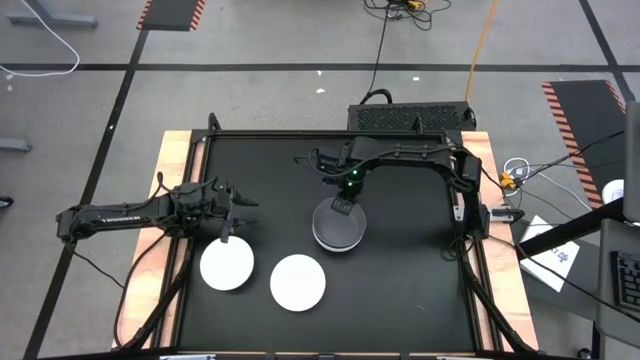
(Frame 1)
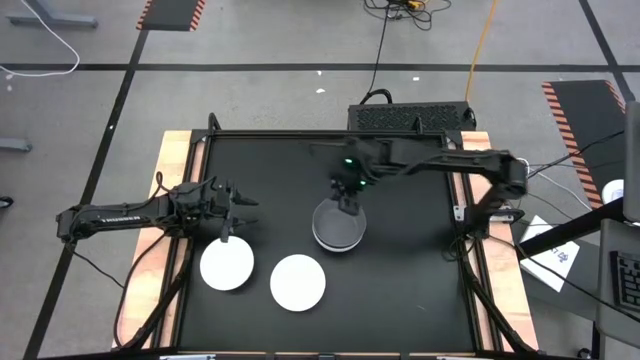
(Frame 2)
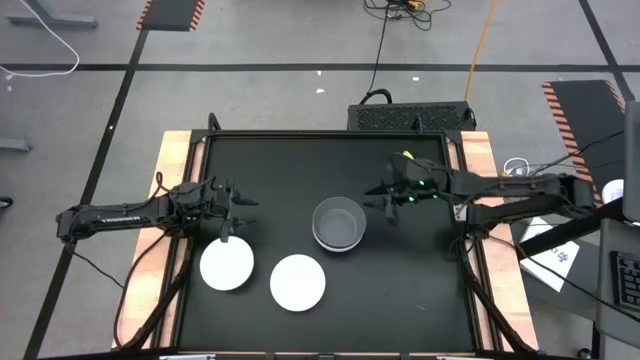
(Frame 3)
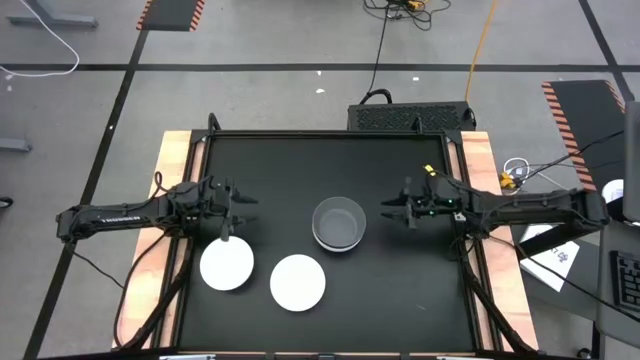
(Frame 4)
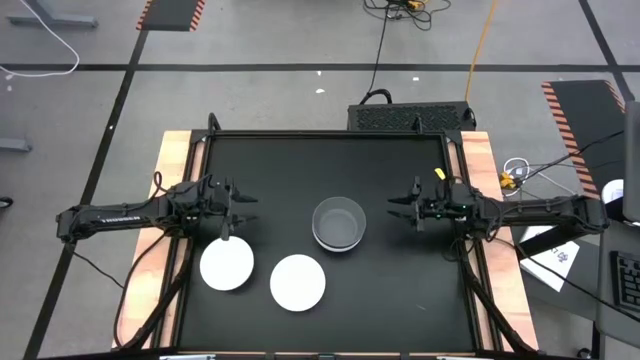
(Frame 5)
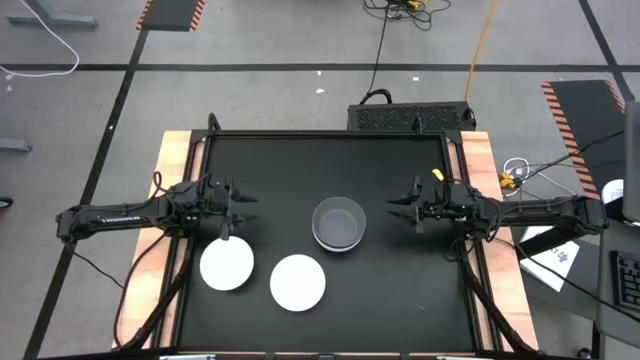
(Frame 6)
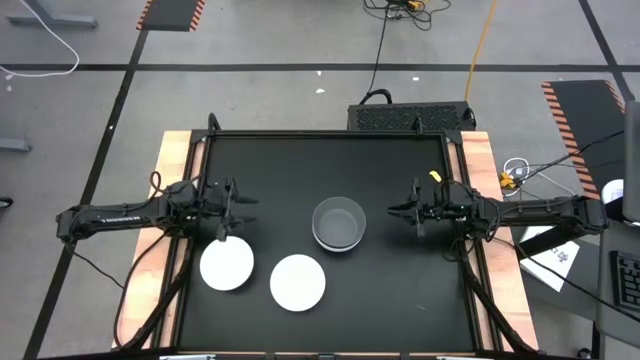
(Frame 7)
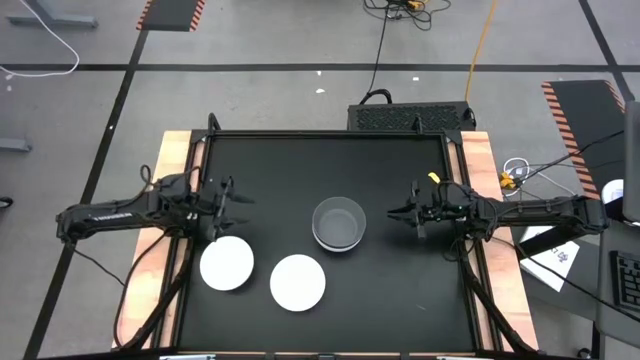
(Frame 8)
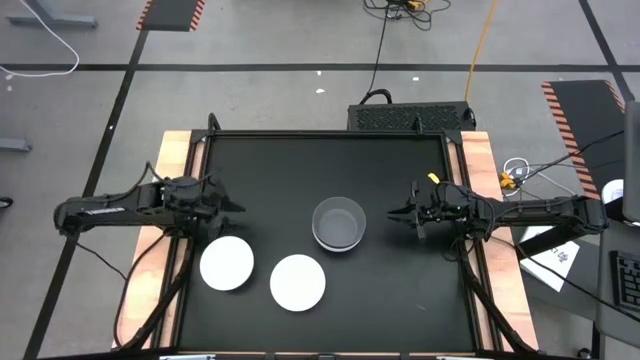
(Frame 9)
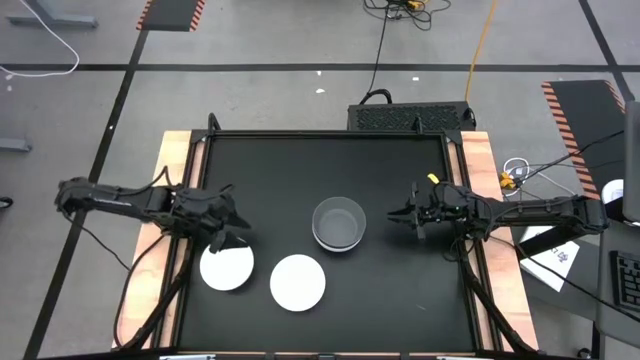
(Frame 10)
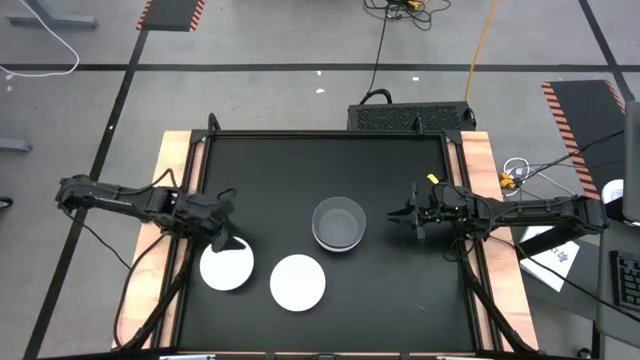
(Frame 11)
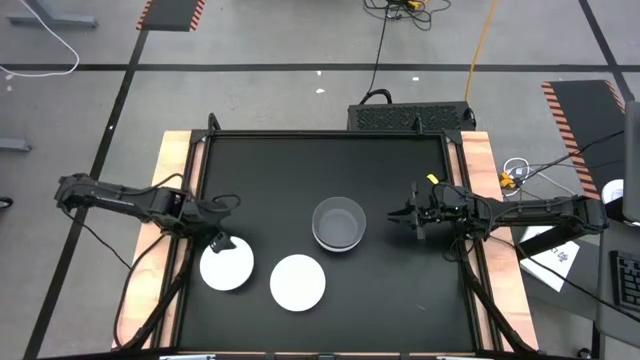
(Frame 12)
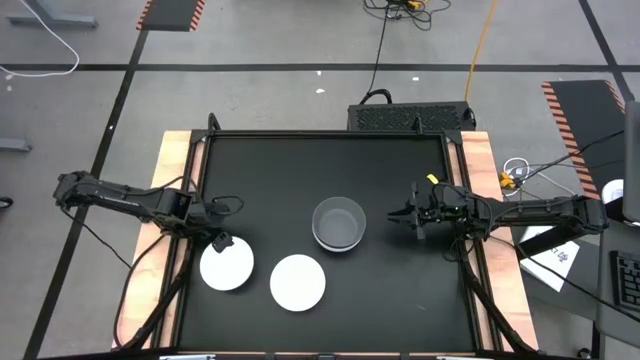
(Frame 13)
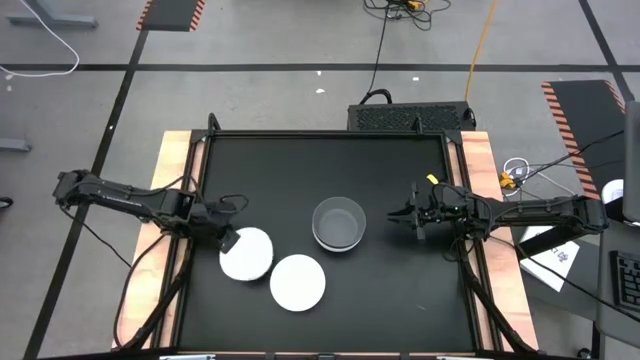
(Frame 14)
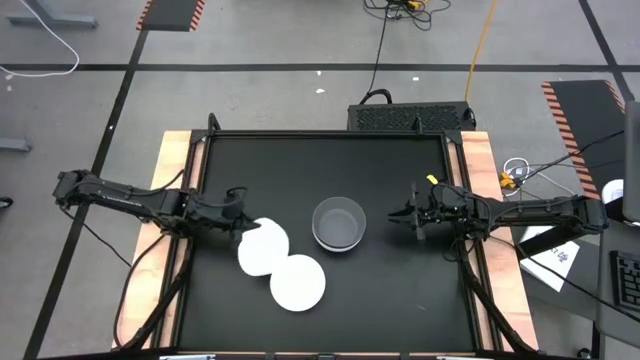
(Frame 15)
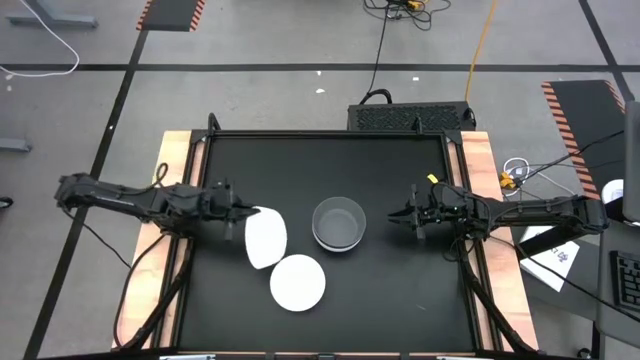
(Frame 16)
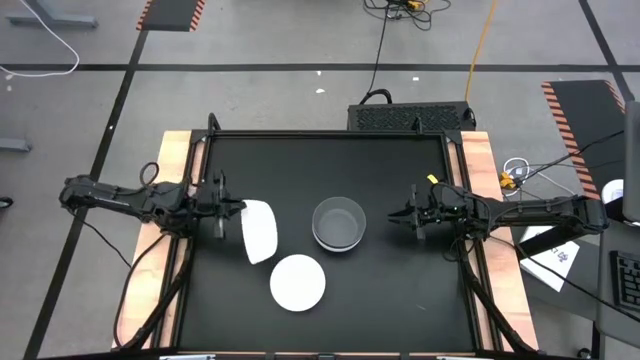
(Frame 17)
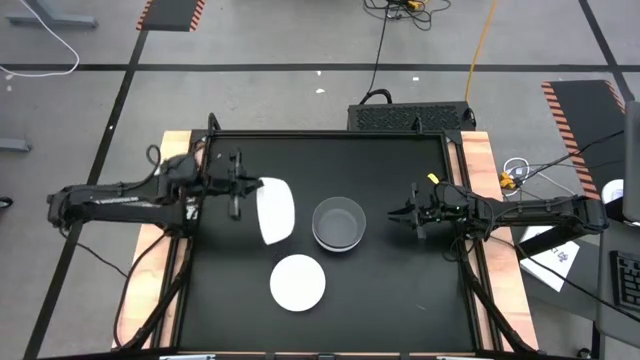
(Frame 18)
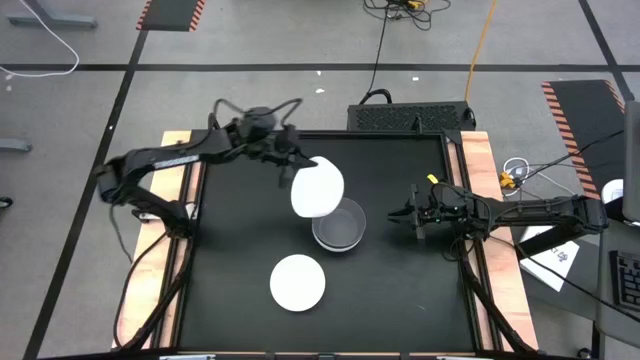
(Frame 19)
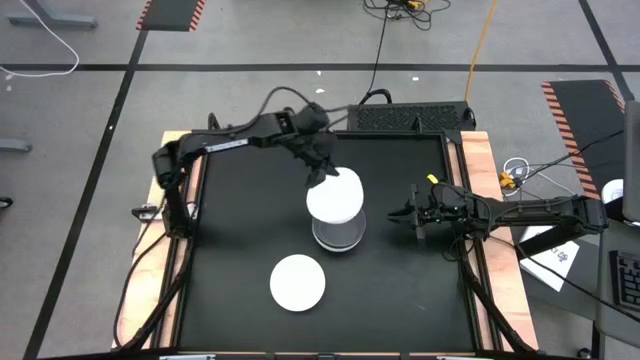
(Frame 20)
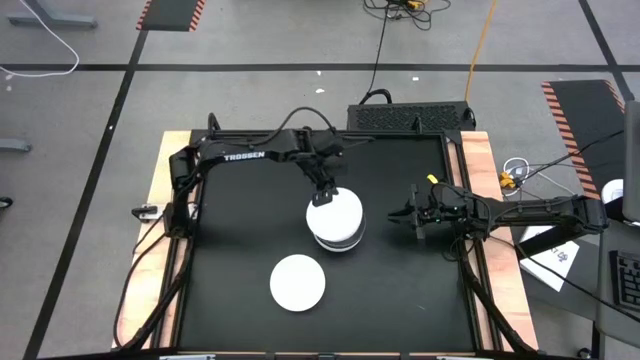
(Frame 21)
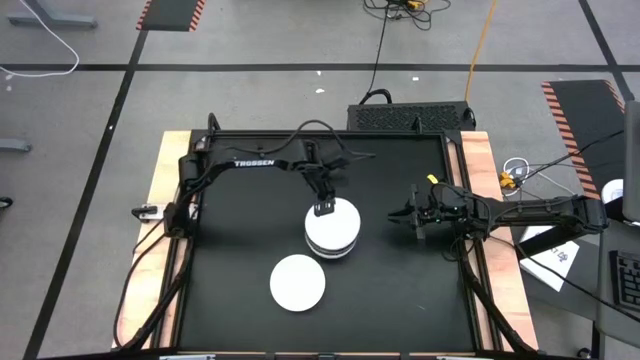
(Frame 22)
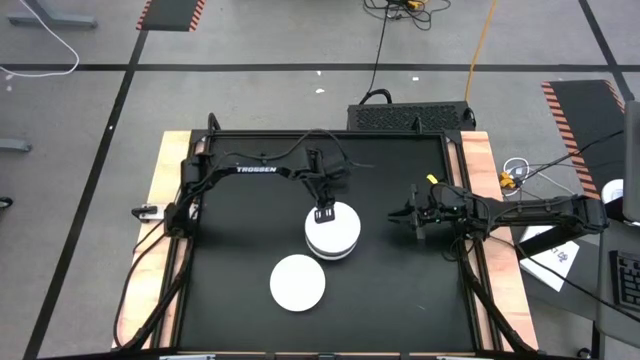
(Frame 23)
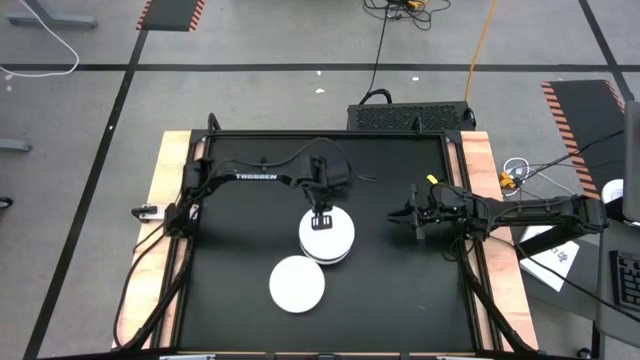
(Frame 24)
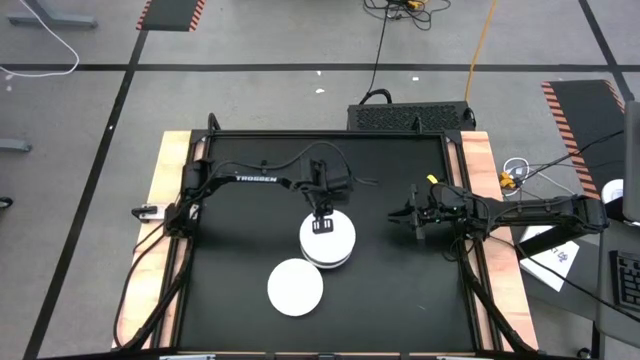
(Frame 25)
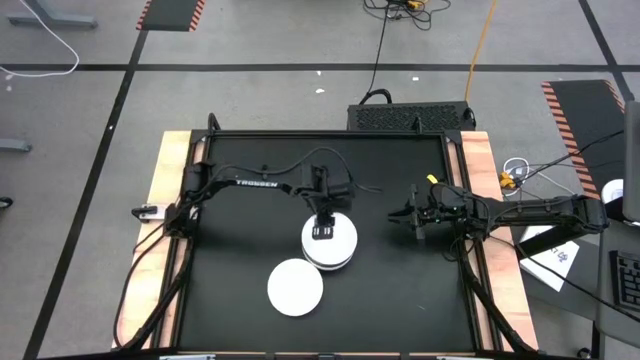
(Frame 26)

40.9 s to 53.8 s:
Task: Nest bowls inside each other
Stack the left white bowl on the dark gray bowl

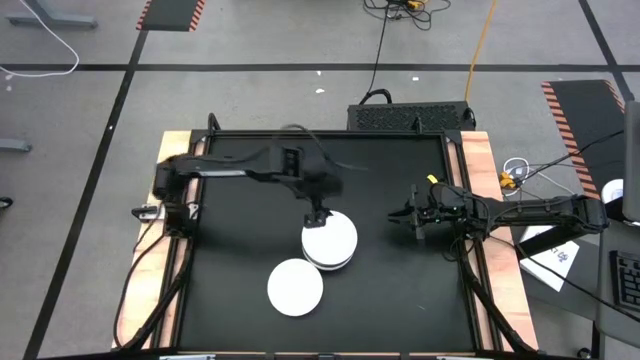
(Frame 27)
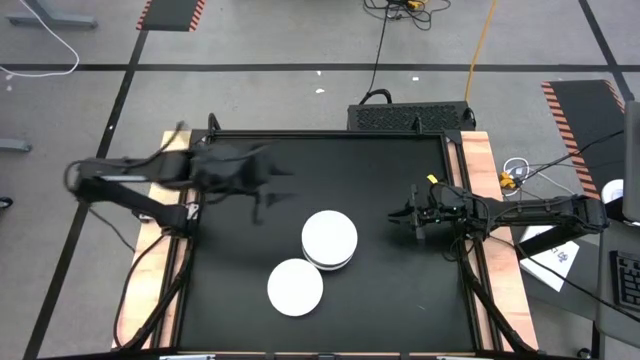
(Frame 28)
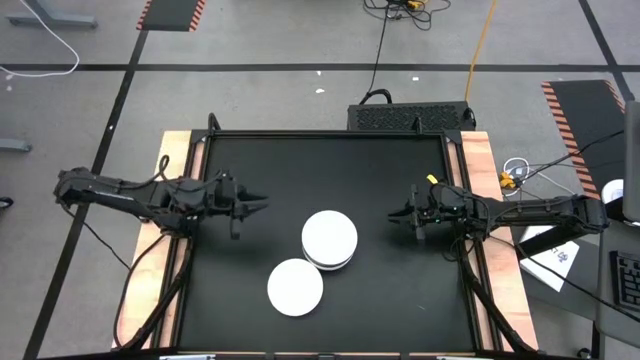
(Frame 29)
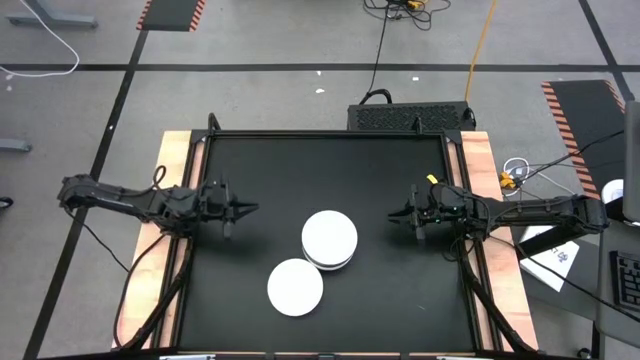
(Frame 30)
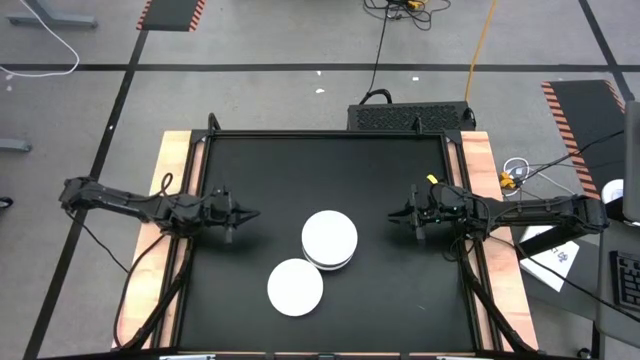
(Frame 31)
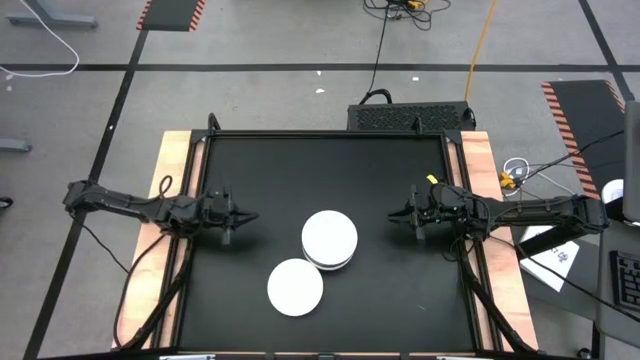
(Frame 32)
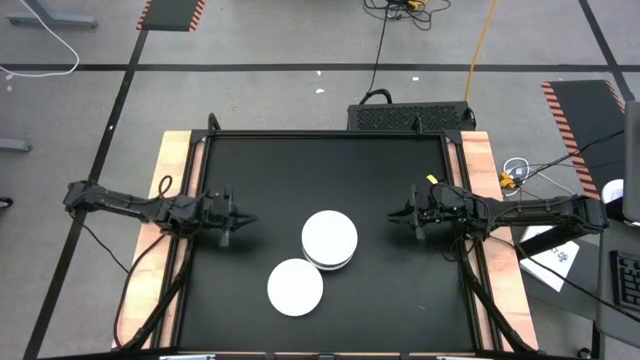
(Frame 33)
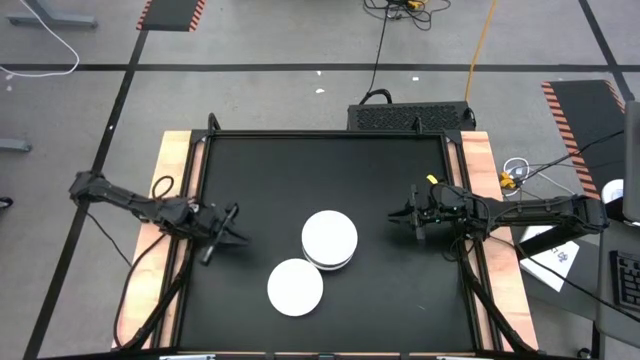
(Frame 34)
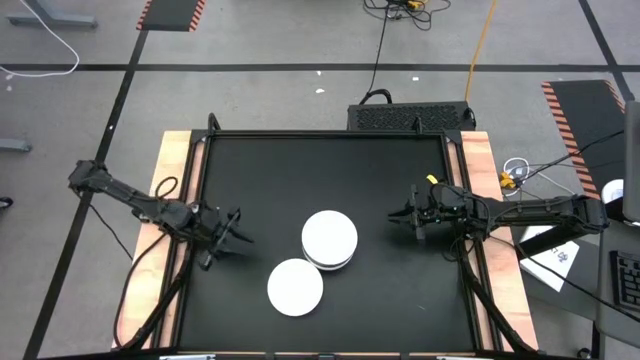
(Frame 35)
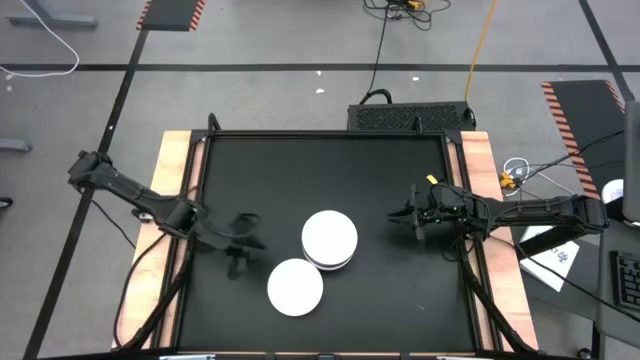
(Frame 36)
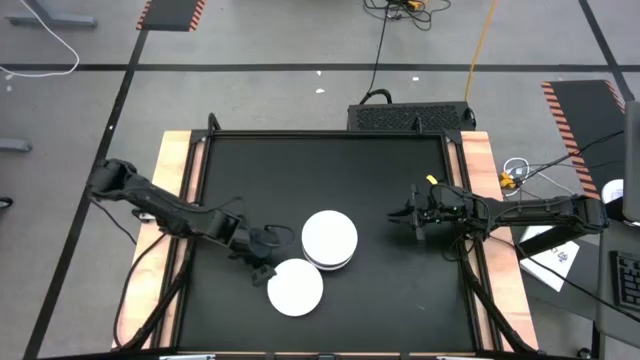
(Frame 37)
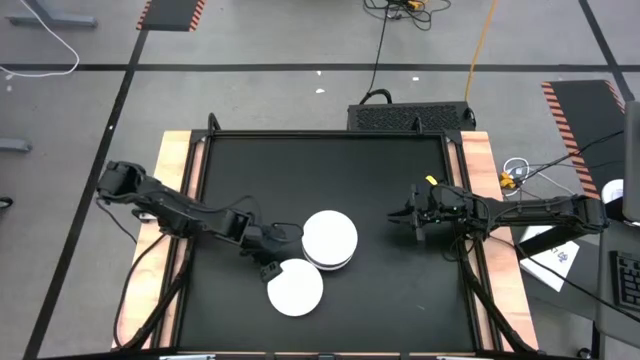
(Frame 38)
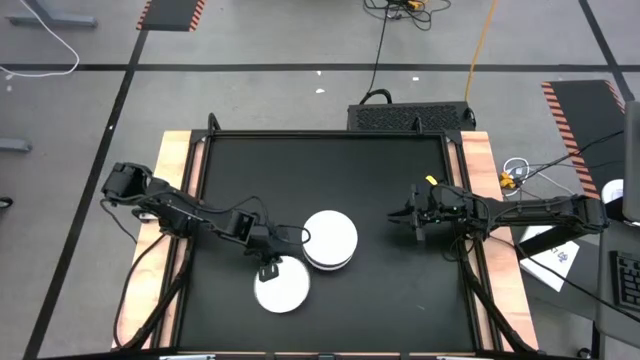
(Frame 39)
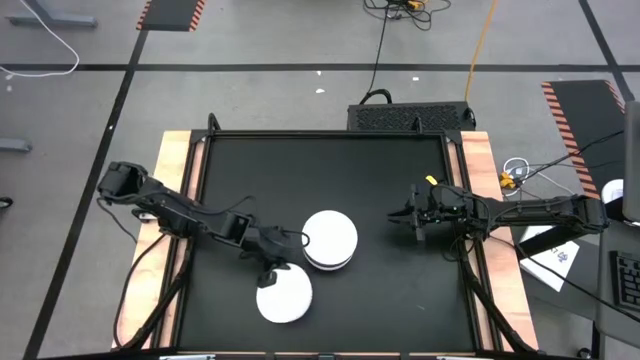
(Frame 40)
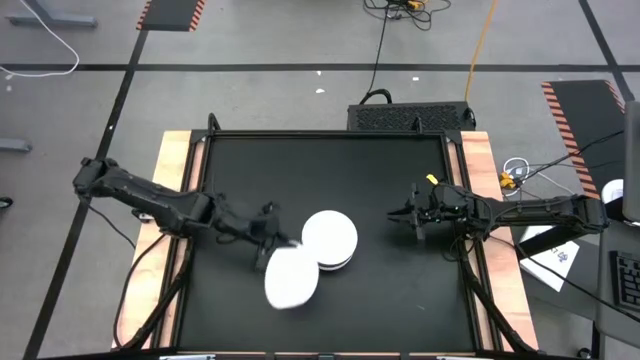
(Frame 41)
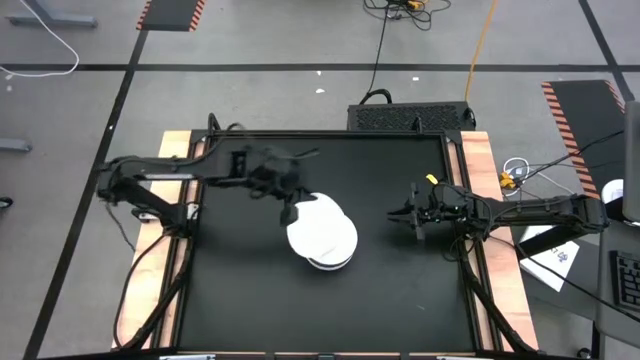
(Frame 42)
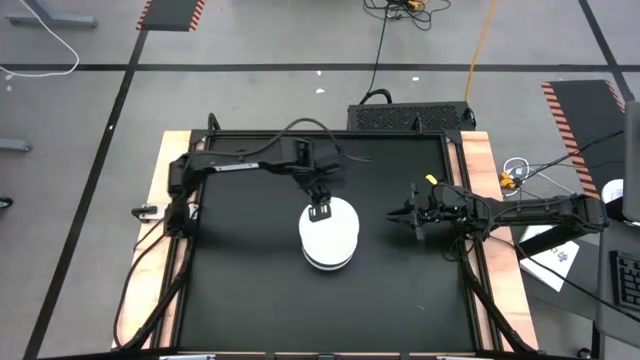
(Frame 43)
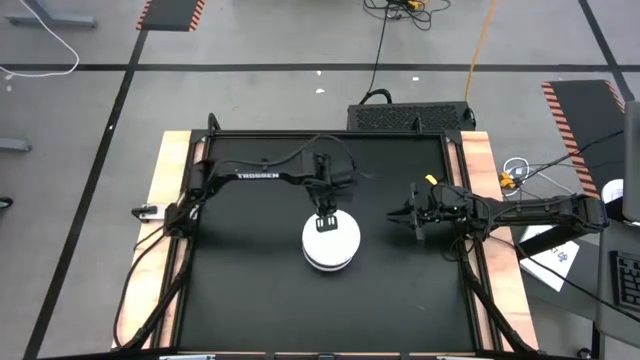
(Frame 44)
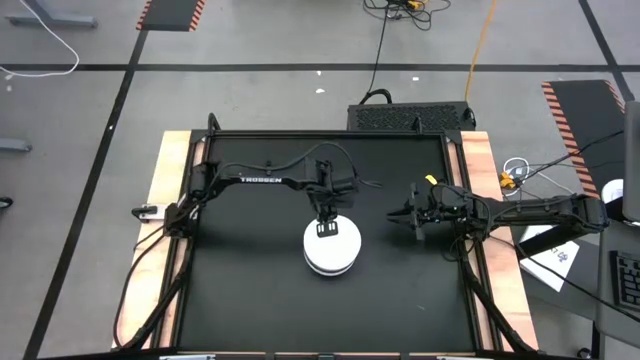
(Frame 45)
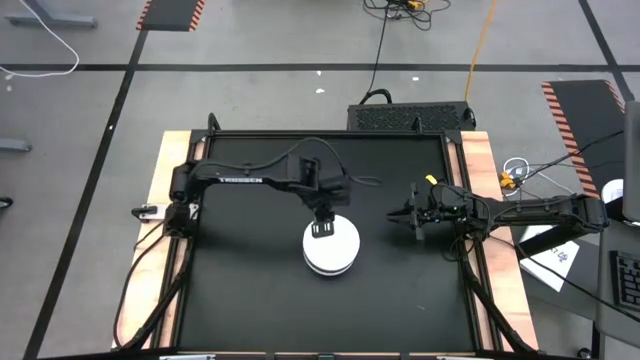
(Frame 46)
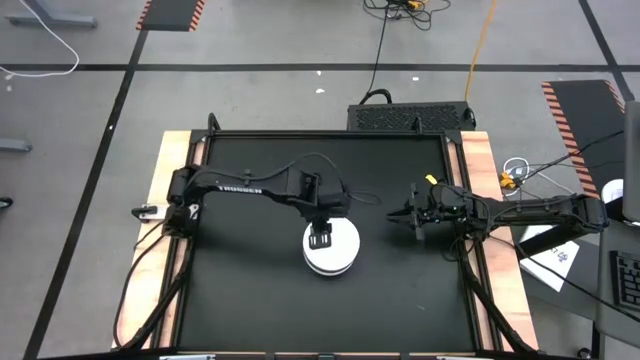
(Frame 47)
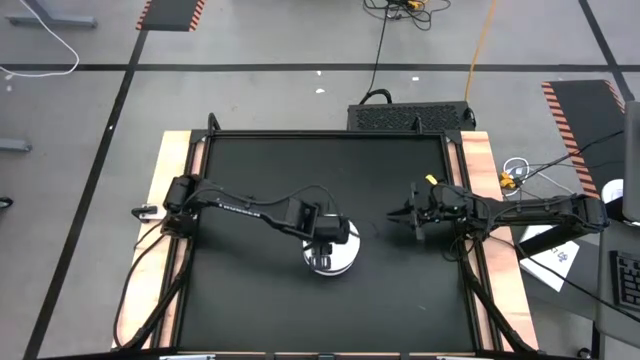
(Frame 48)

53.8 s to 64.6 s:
Stack the white bowl on the other white bowl
